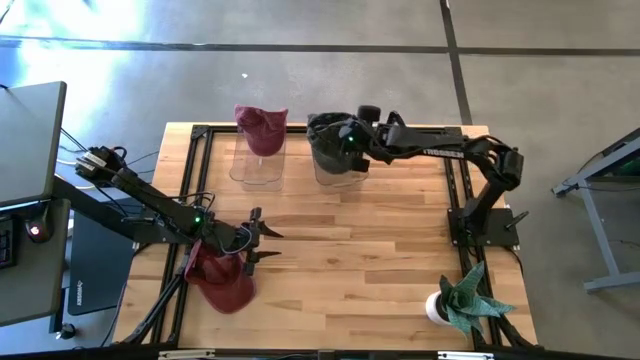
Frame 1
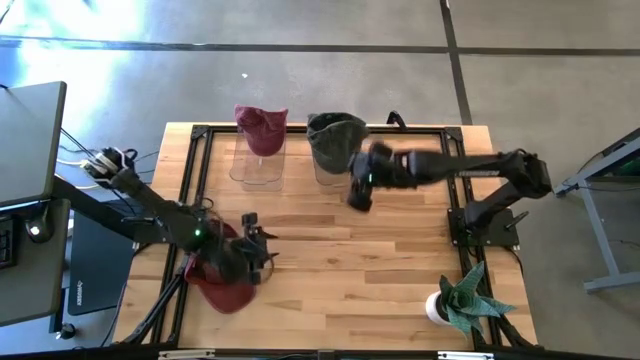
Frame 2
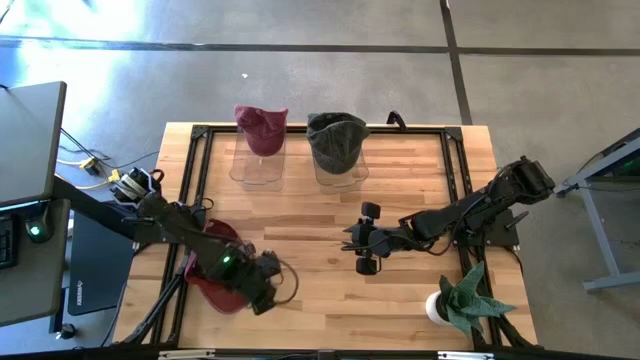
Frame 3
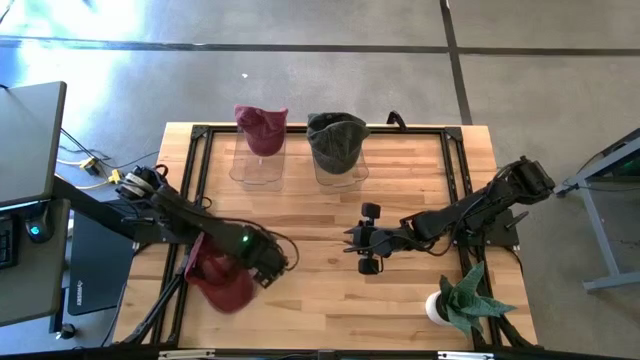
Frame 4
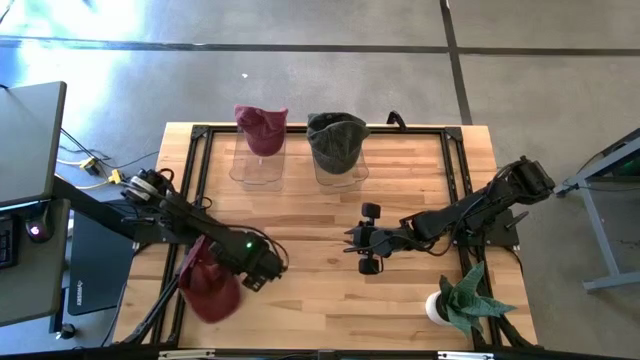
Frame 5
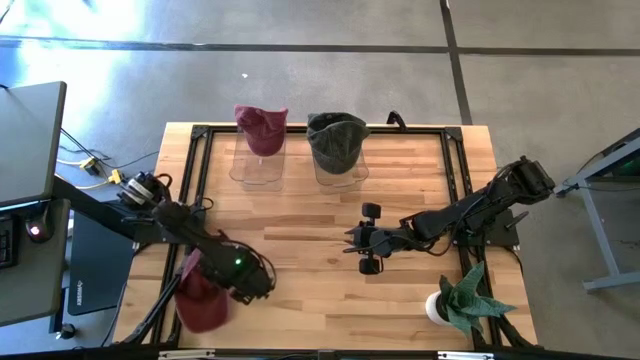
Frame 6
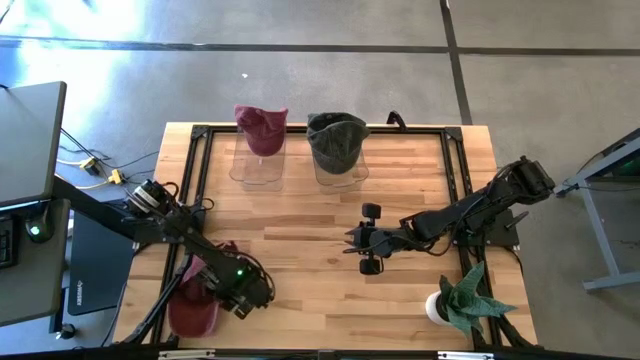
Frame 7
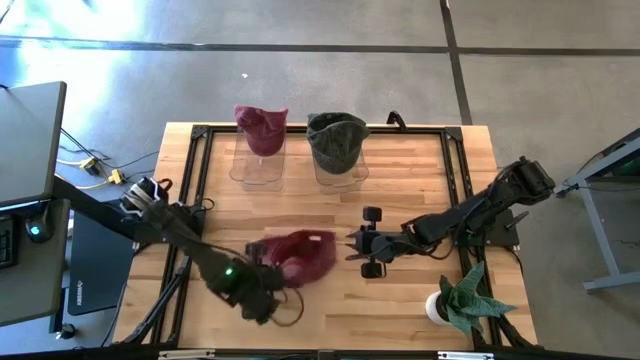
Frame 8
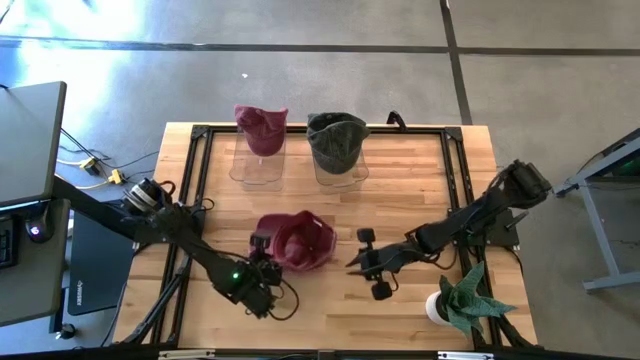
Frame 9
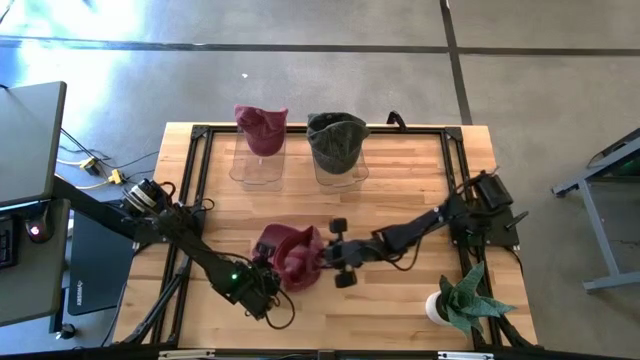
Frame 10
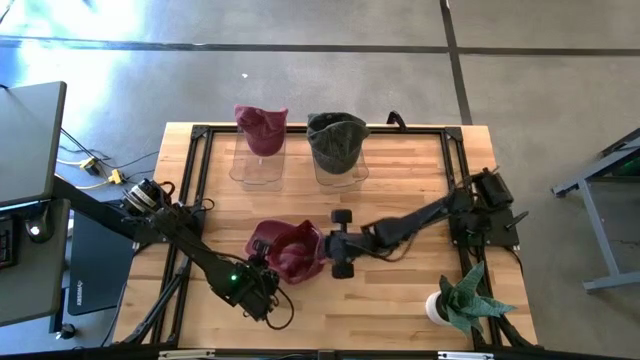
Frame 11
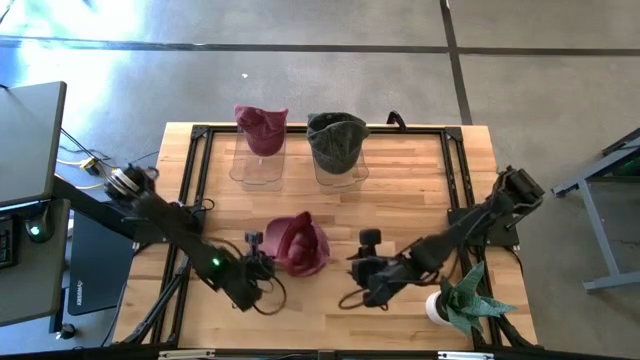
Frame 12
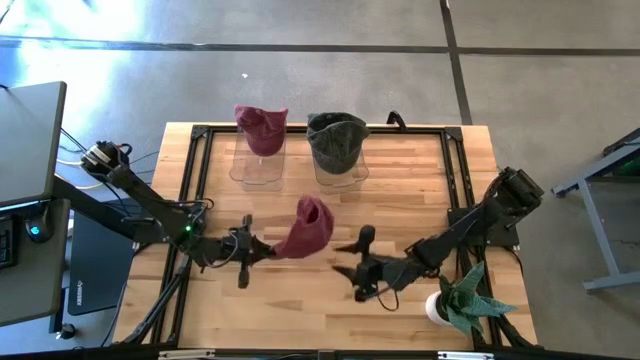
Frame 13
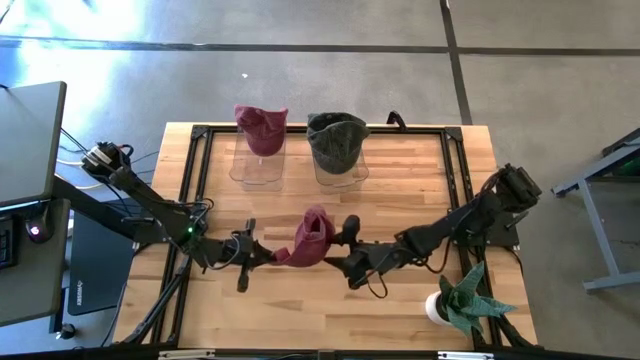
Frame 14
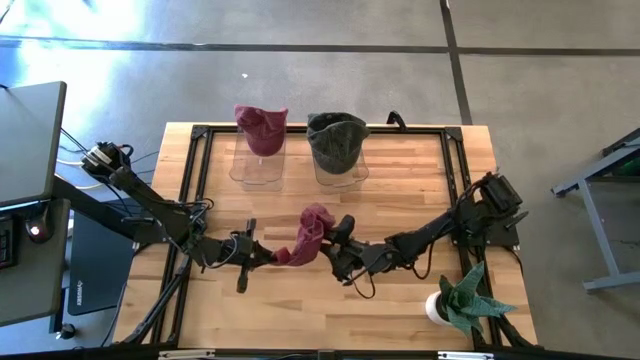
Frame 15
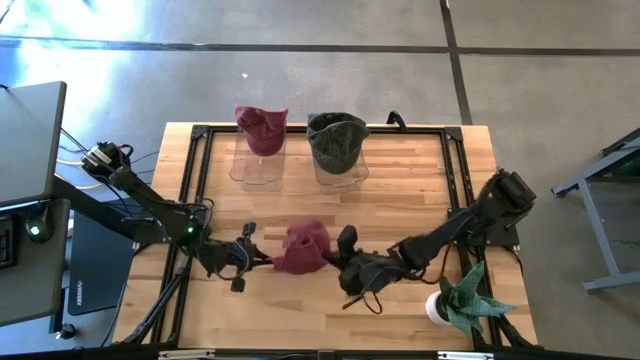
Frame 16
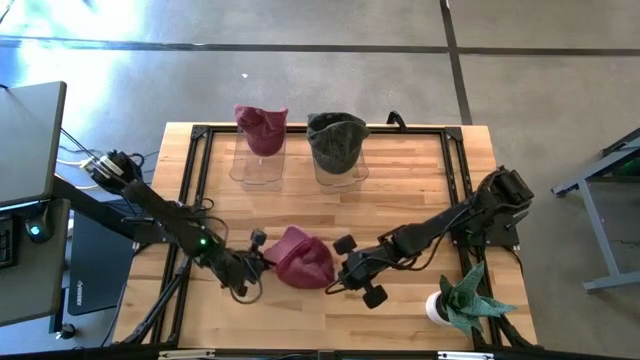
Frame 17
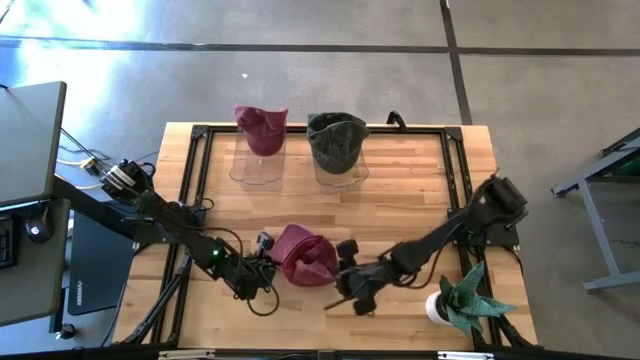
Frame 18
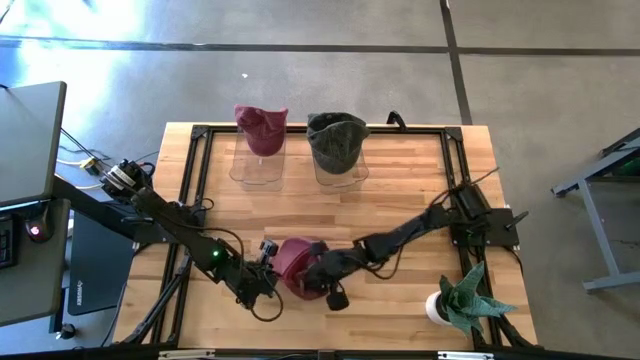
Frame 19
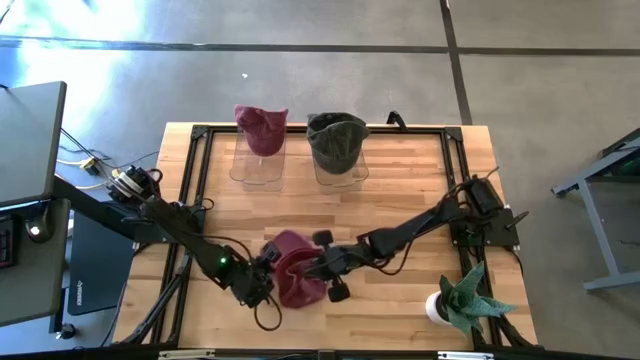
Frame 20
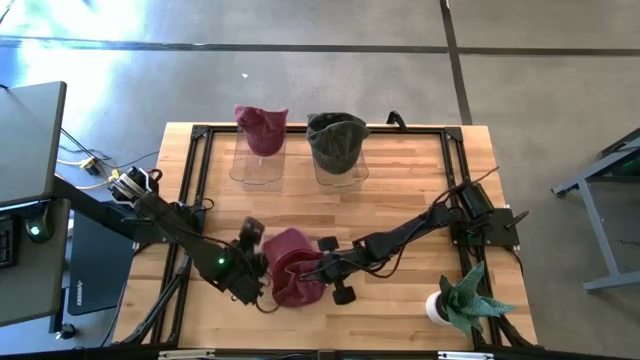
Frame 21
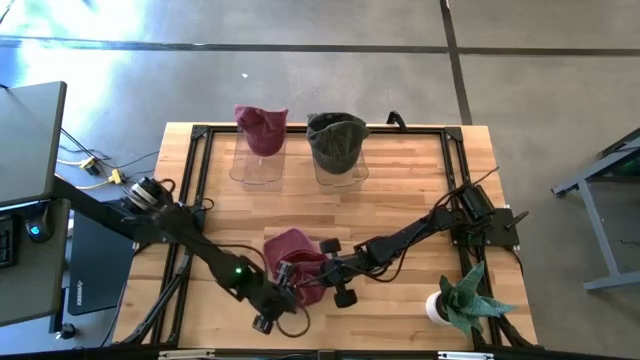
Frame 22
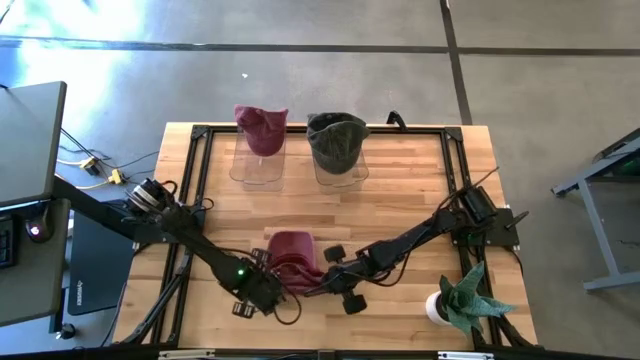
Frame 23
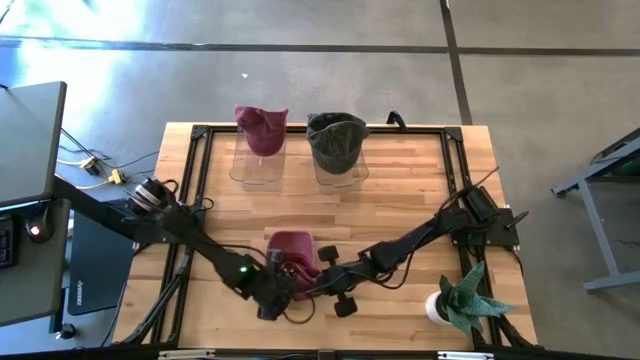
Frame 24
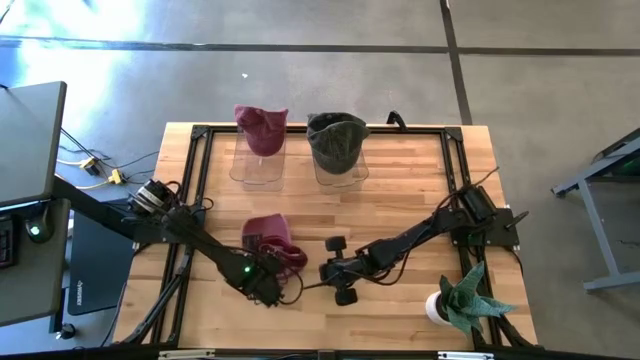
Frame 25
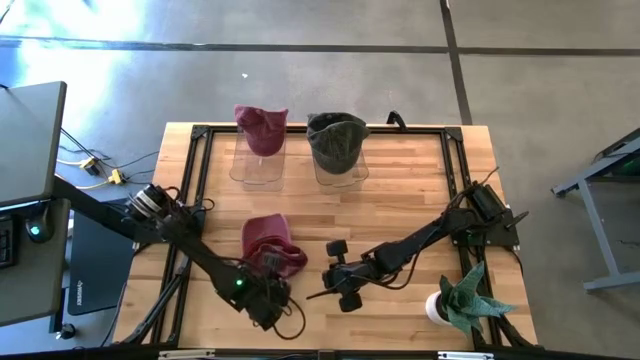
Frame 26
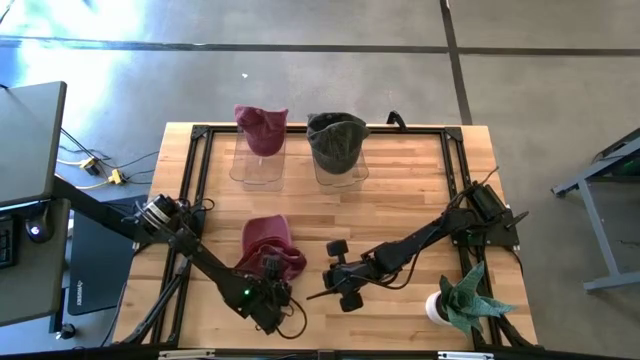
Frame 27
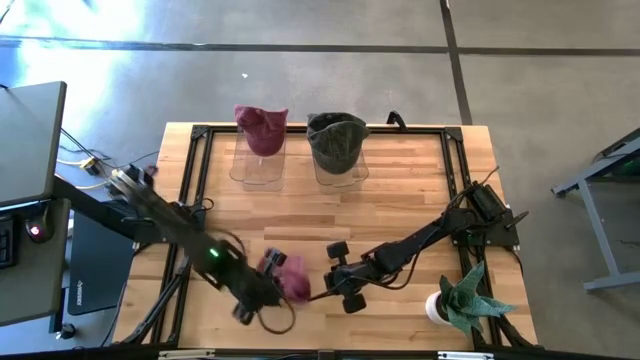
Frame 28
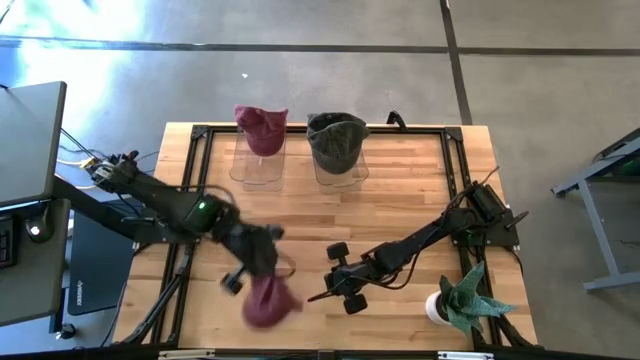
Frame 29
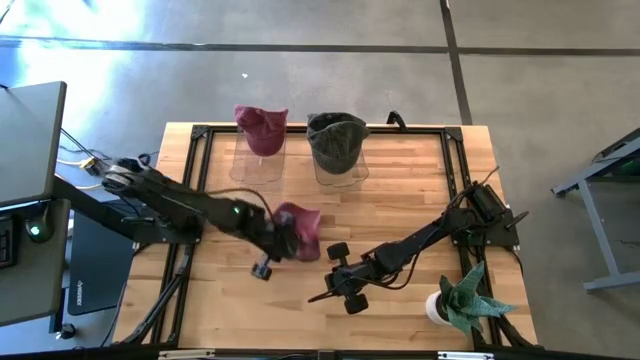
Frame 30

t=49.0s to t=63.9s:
Task: Pick & Place hat
Put the red cap into the left transparent bin

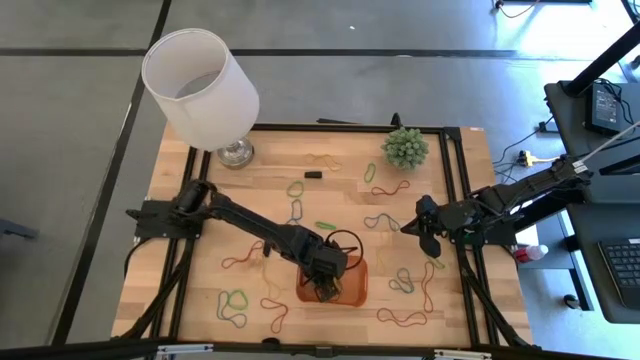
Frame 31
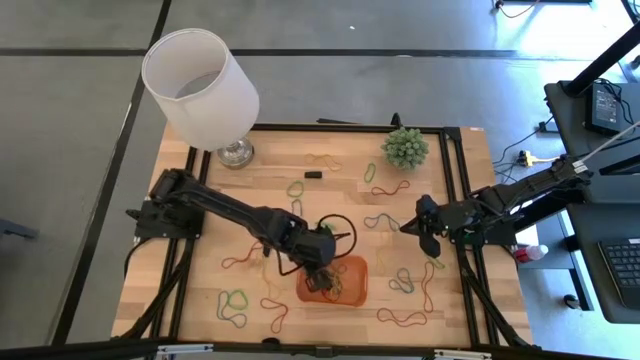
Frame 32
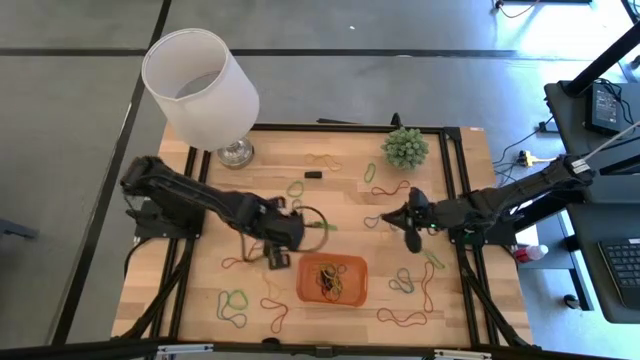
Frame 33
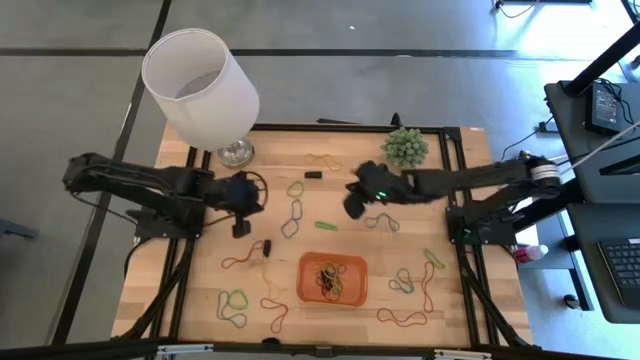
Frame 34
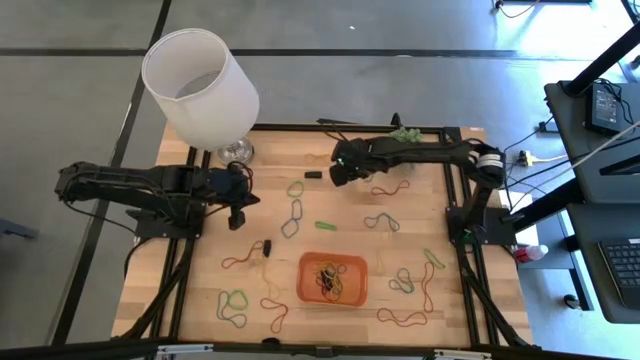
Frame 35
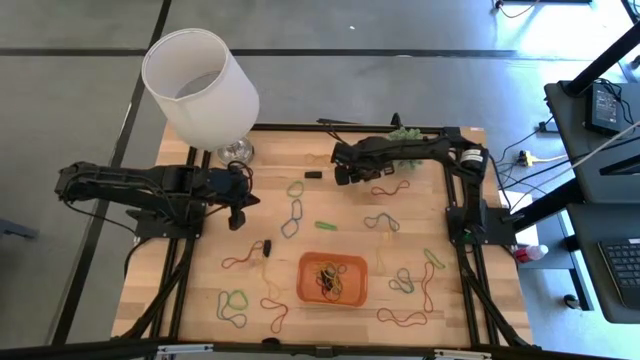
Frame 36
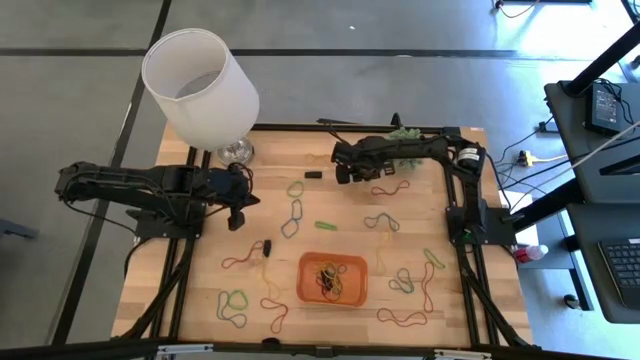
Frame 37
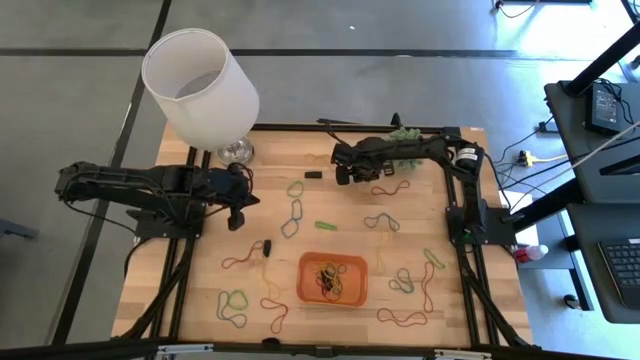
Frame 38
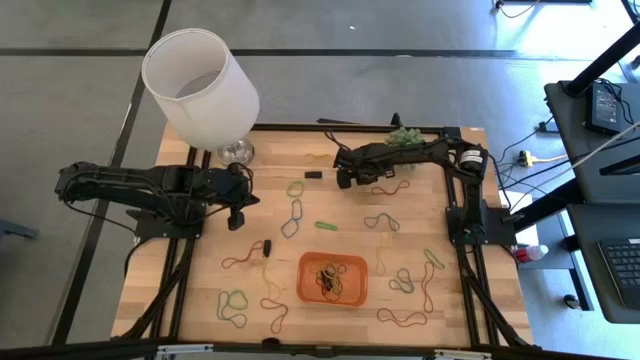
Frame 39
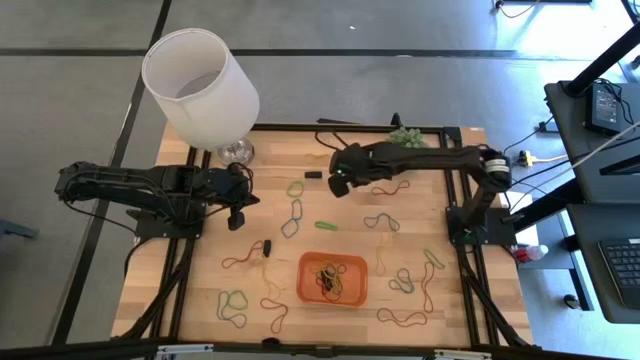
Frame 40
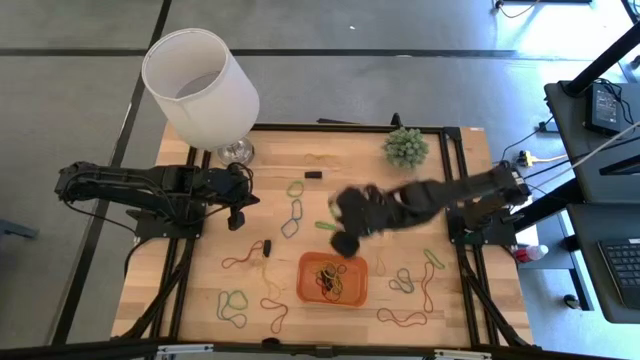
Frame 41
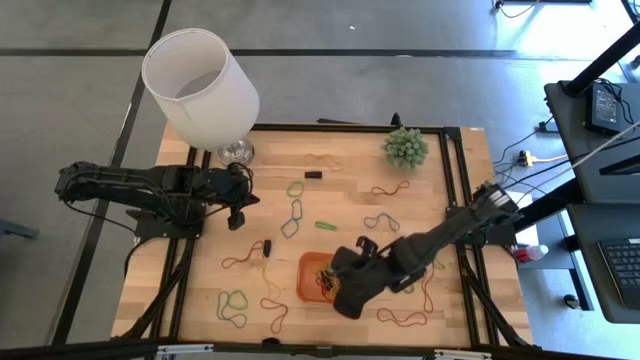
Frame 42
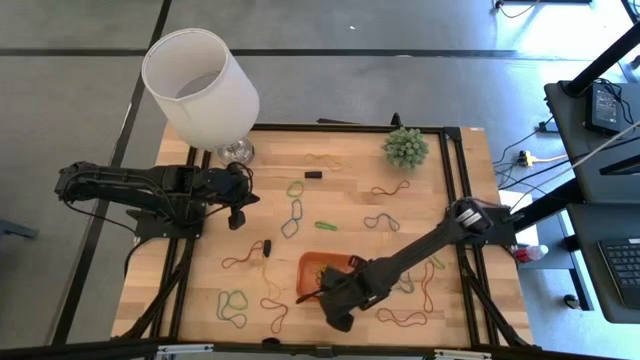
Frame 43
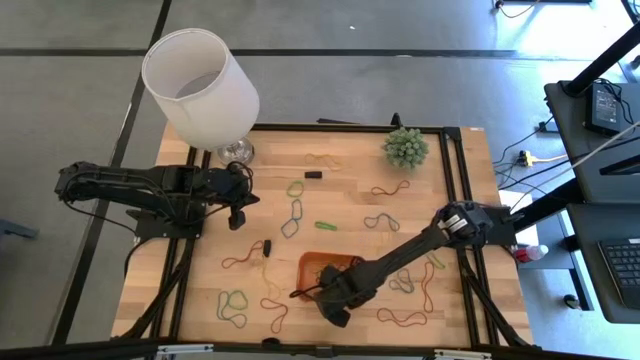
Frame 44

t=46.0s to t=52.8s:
Task: Pick and place rubber bands into bin
Put the green rubber band into the orange bin
